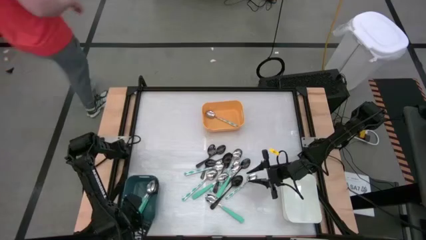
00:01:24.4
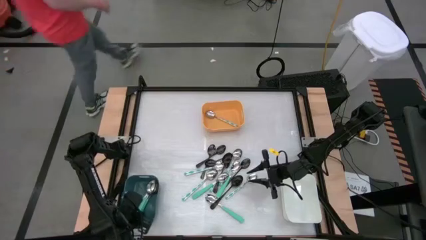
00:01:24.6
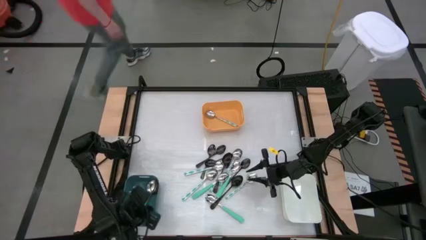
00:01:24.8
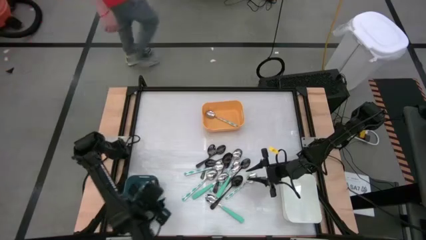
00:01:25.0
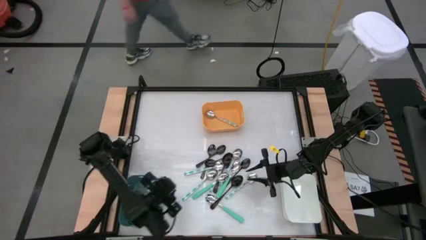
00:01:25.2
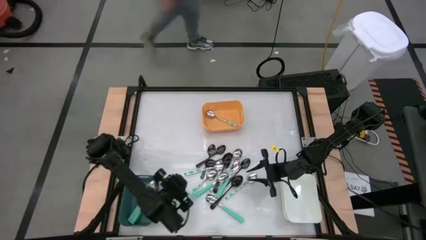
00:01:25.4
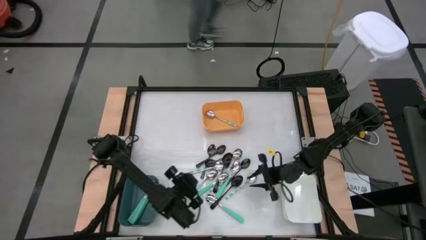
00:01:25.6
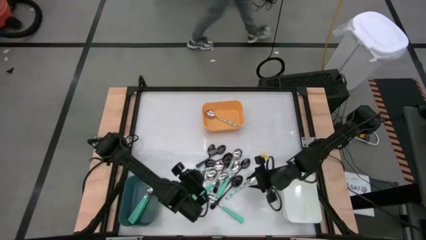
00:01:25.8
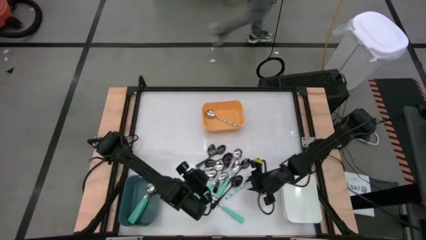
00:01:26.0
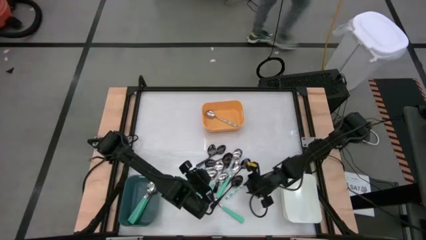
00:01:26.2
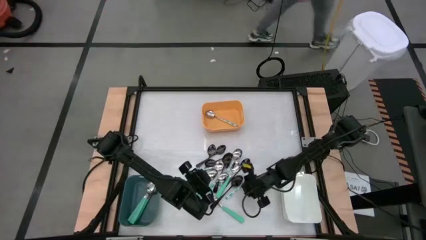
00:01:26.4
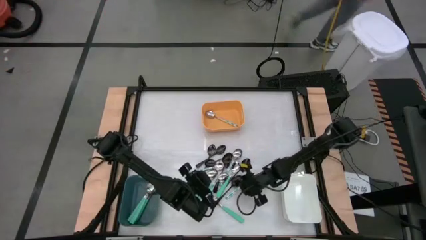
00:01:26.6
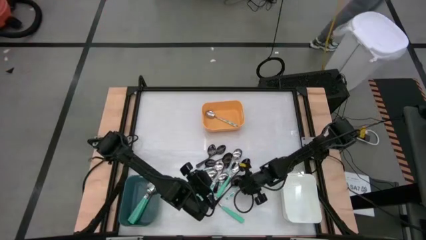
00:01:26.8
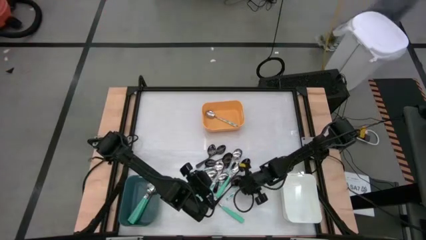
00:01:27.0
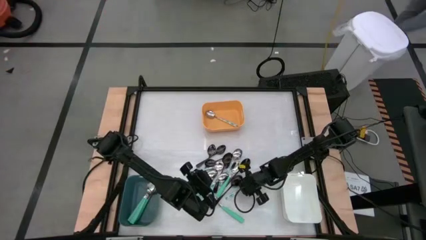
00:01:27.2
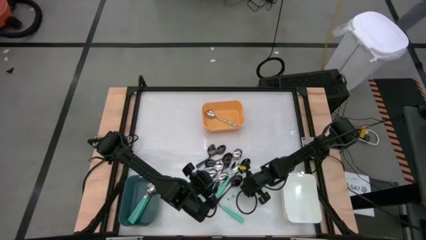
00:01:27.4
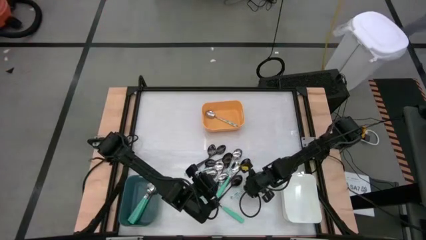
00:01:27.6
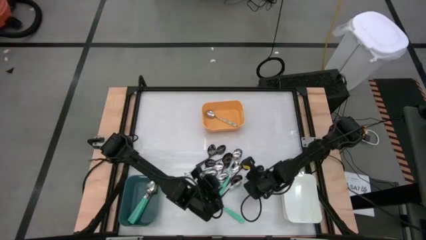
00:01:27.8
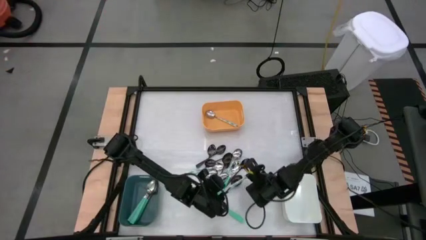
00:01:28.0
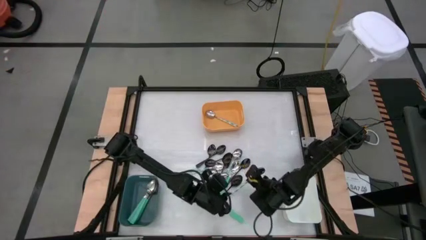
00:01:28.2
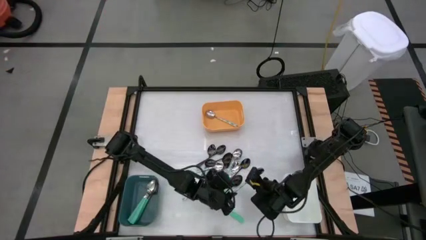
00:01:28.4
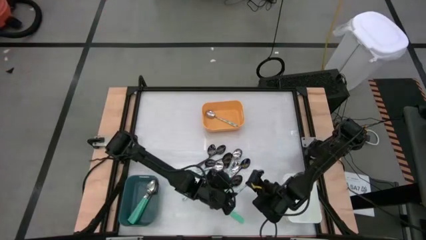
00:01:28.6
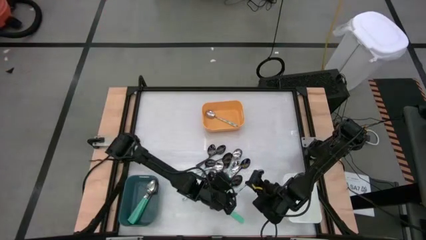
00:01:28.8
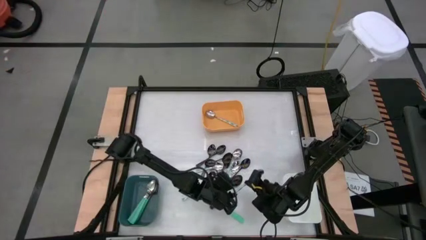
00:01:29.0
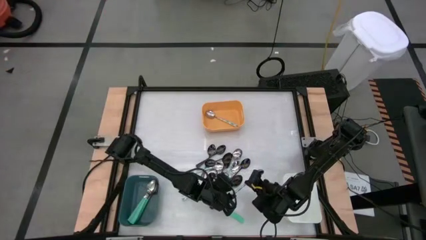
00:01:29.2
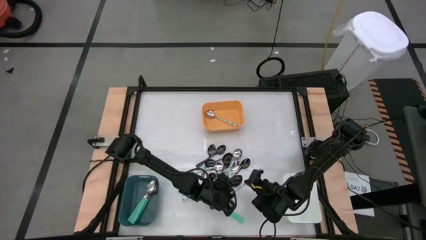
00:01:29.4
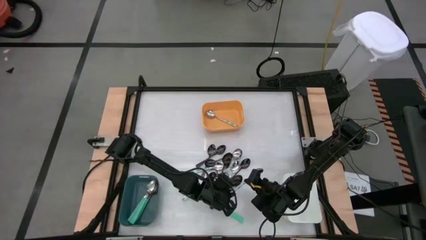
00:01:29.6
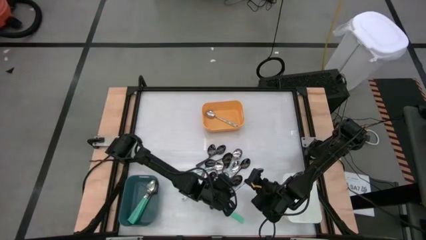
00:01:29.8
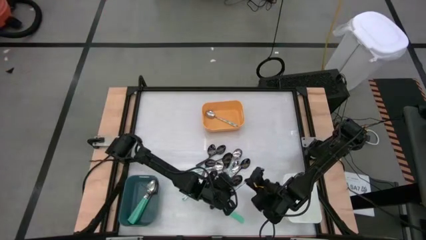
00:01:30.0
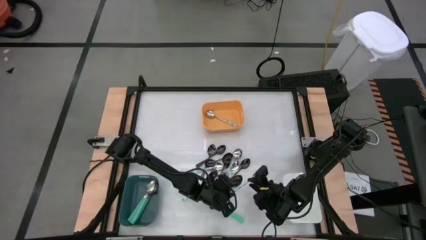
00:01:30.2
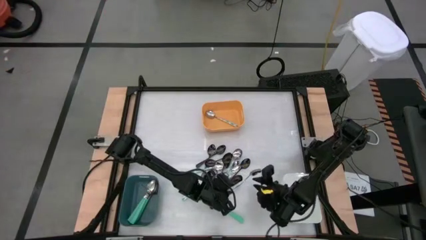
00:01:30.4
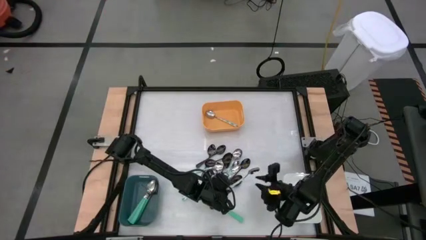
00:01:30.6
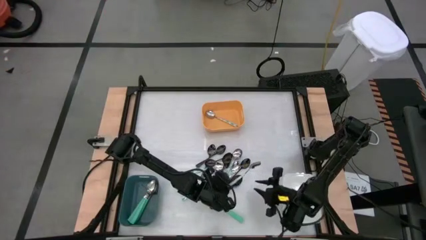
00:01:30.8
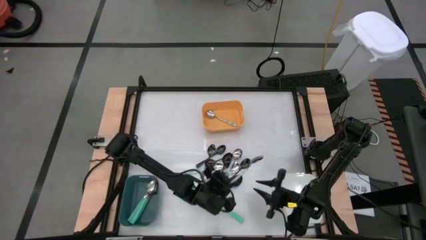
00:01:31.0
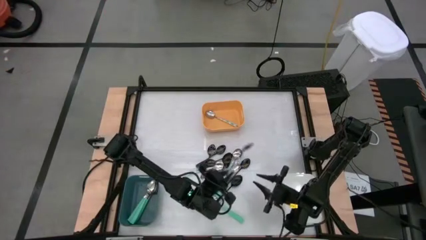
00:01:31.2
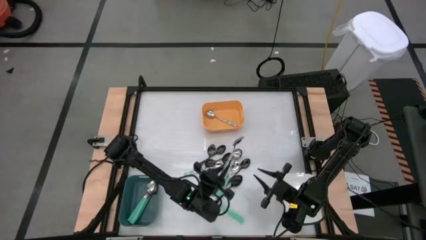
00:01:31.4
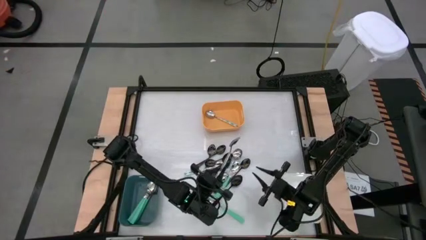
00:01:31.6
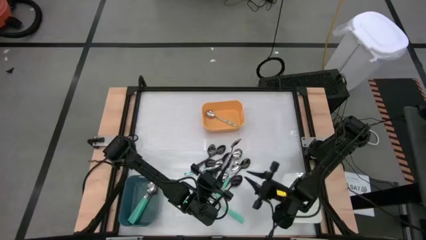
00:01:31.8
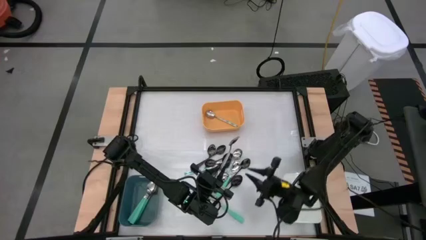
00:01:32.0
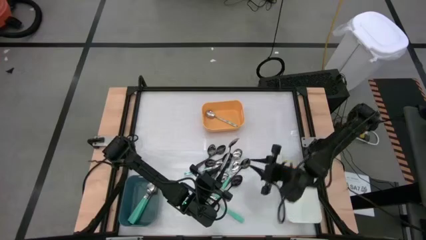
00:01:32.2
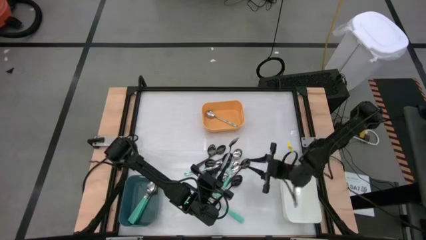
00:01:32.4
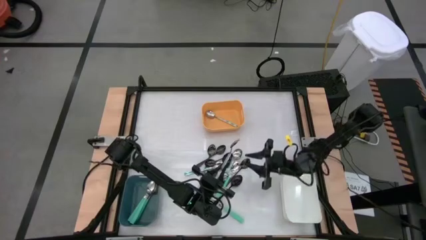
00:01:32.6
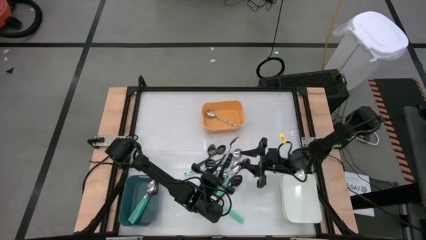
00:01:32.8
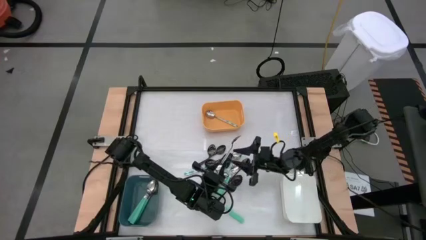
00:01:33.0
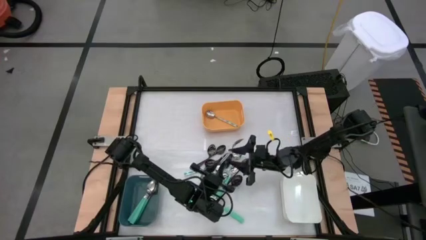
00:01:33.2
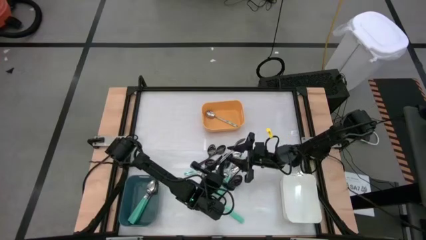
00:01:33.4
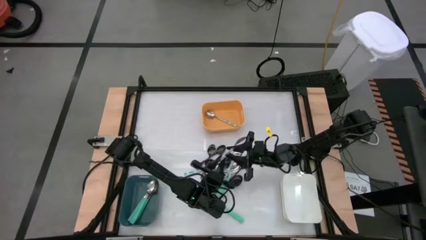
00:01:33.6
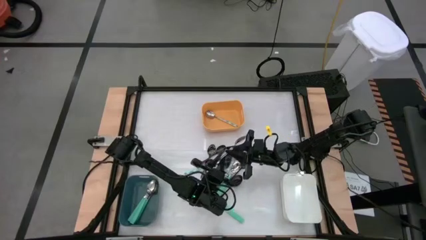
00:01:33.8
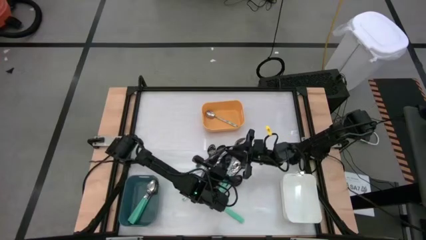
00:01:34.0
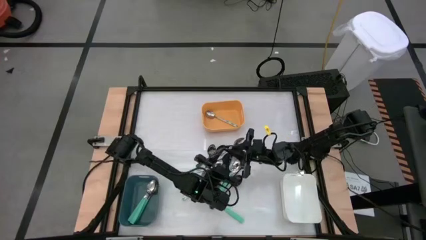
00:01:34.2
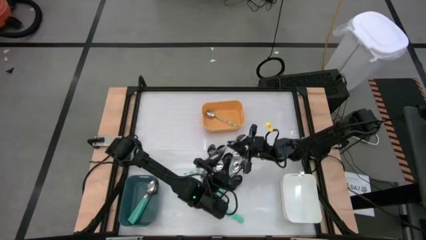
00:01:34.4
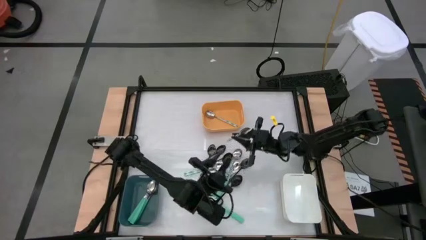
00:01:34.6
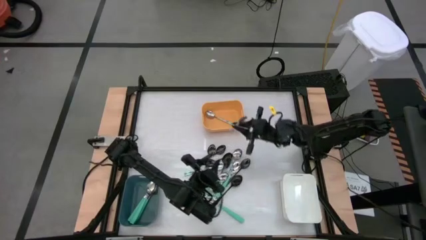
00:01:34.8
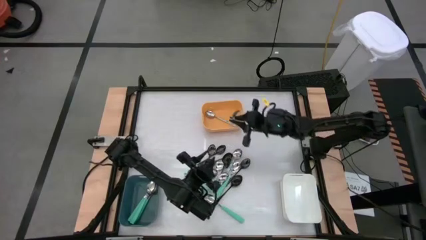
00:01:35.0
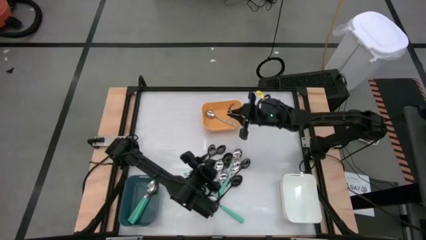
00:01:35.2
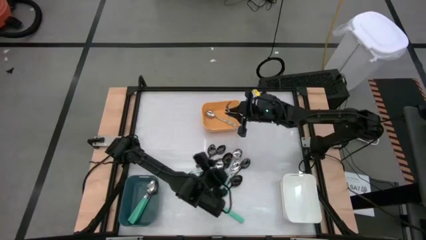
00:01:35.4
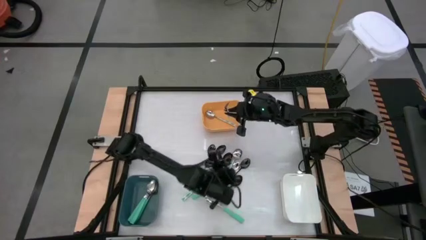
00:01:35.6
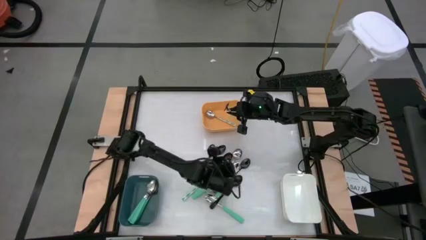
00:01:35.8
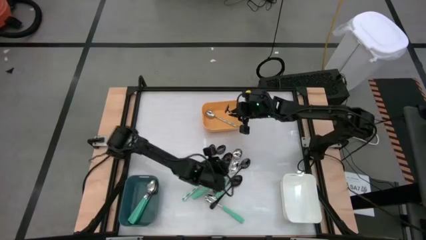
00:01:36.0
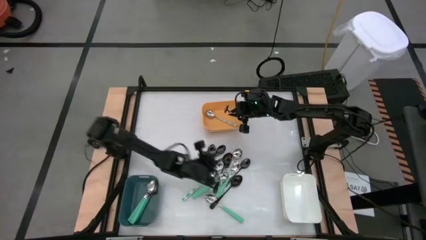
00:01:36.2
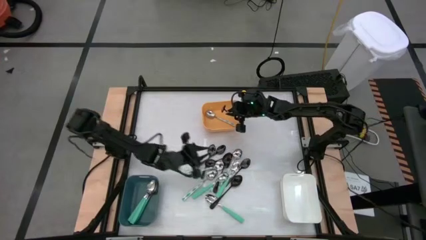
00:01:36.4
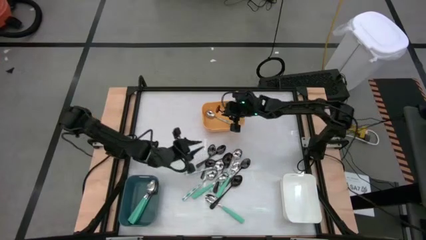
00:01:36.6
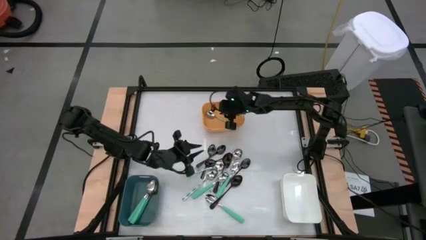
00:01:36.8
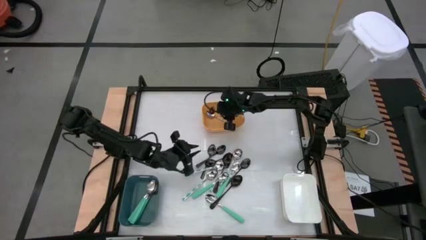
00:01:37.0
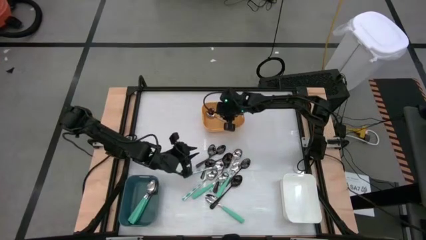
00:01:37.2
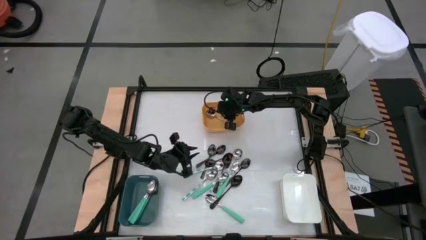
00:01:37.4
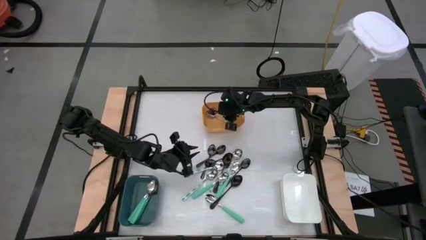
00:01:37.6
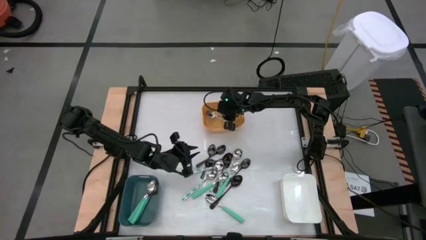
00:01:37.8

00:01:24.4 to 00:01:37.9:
Task: Sort silverware by color (type)
Put the white patterned spoon into the yellow bin
